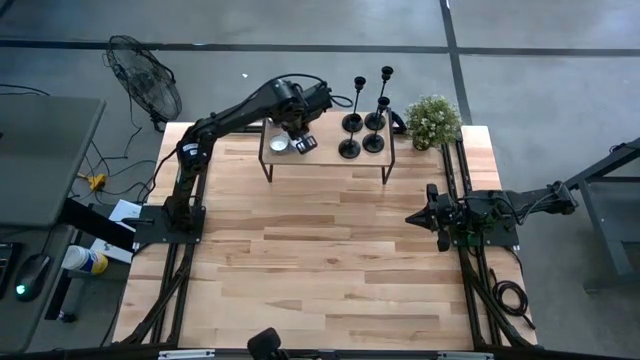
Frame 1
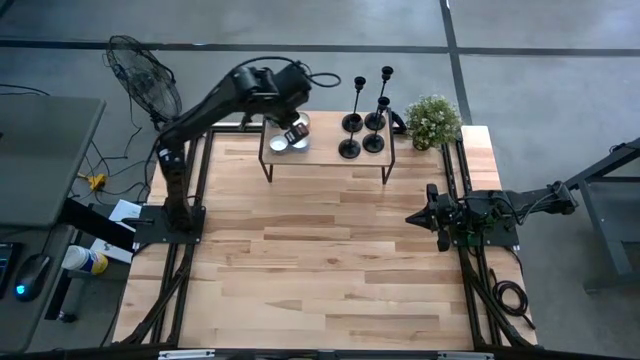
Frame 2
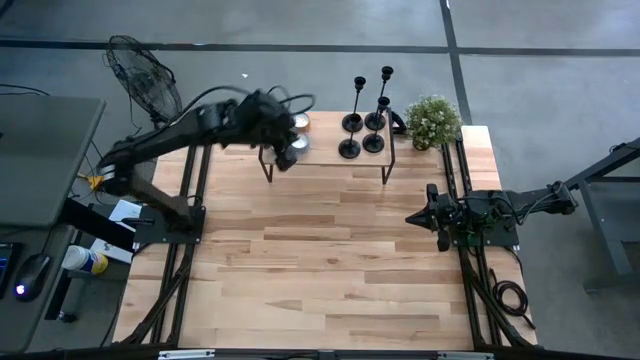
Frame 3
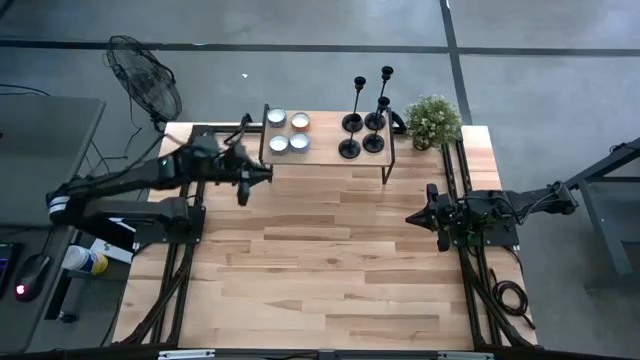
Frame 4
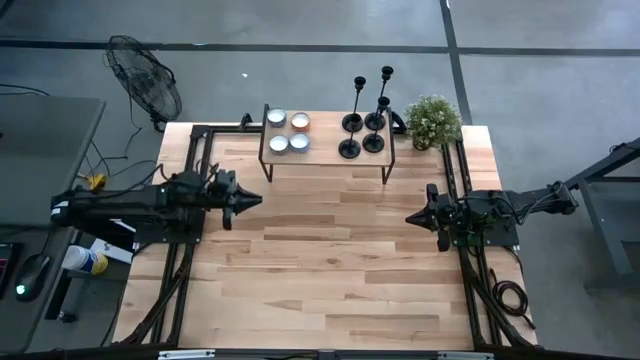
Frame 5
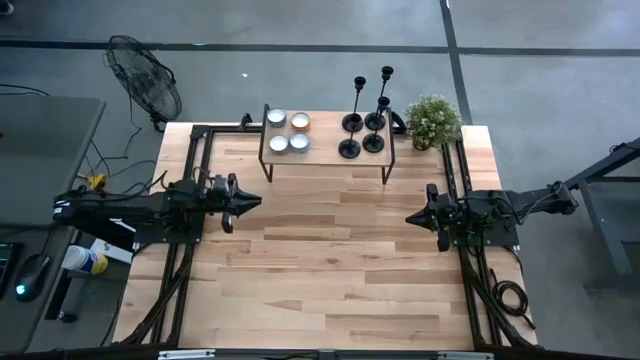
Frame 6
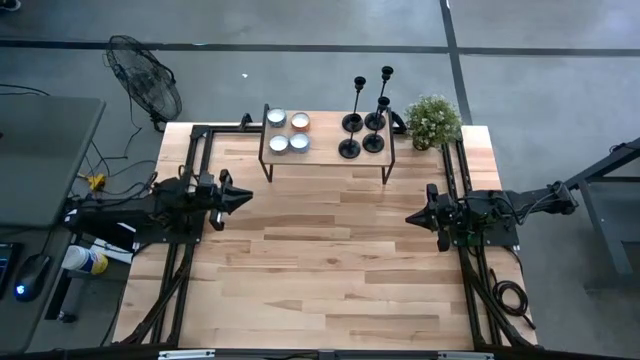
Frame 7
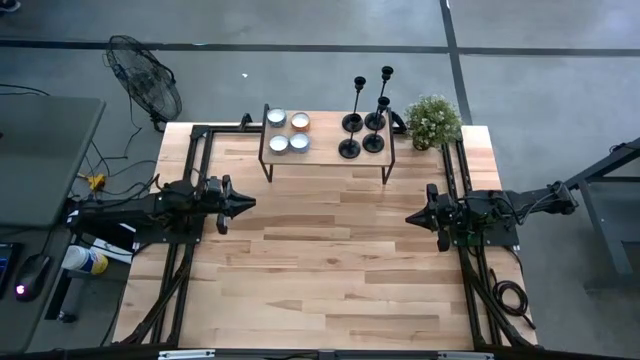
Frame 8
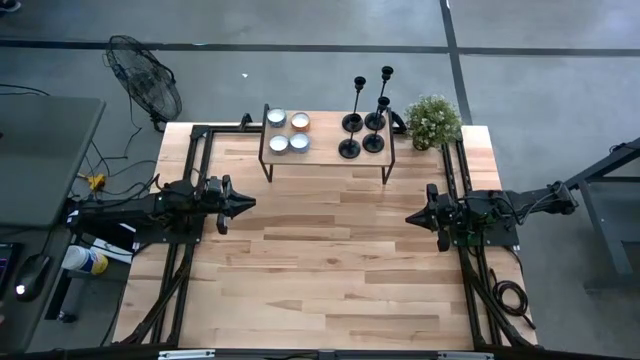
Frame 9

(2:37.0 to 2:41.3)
Task: Pick & Place candle stick holders
Return to Home Position

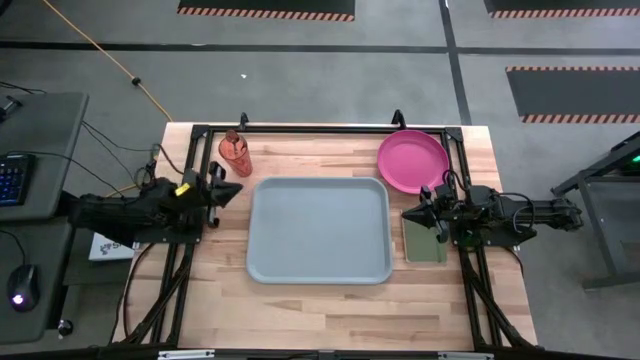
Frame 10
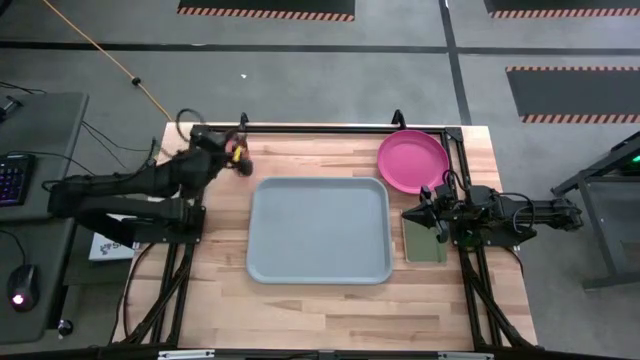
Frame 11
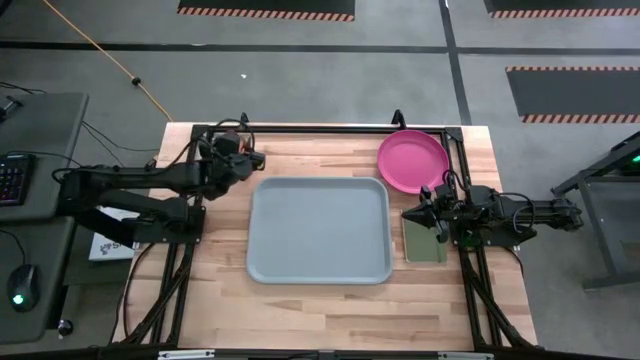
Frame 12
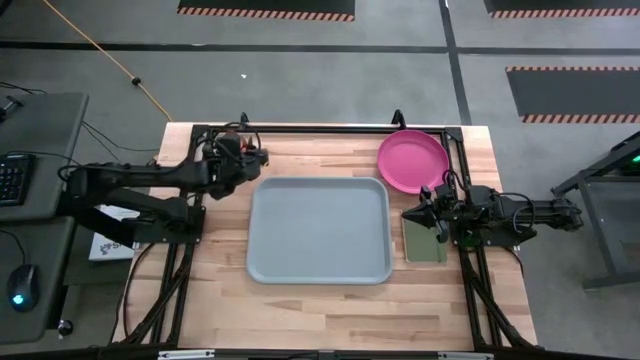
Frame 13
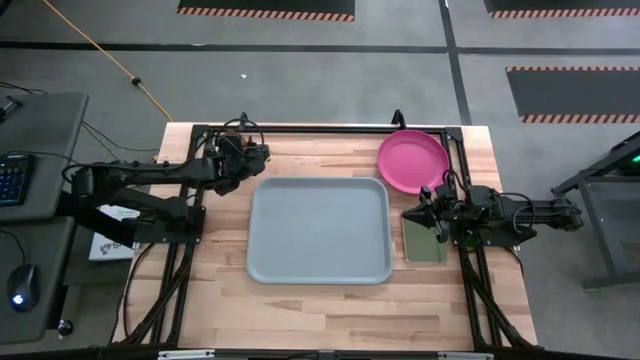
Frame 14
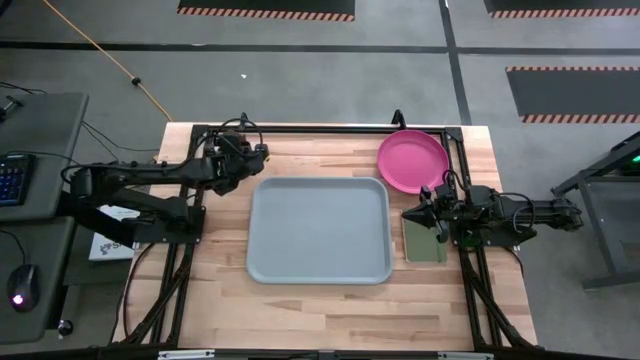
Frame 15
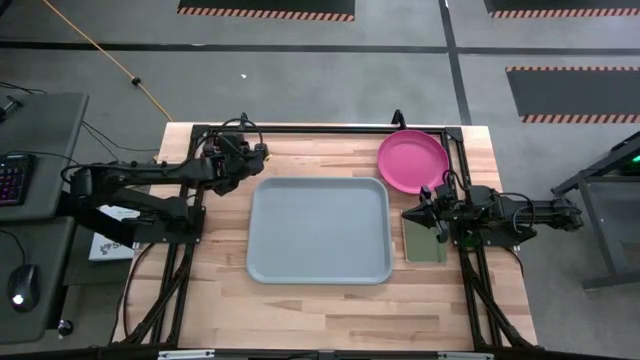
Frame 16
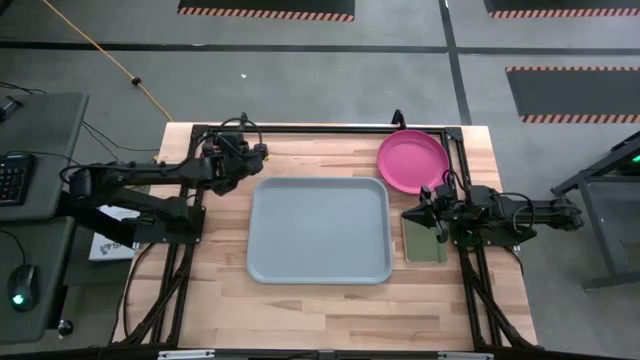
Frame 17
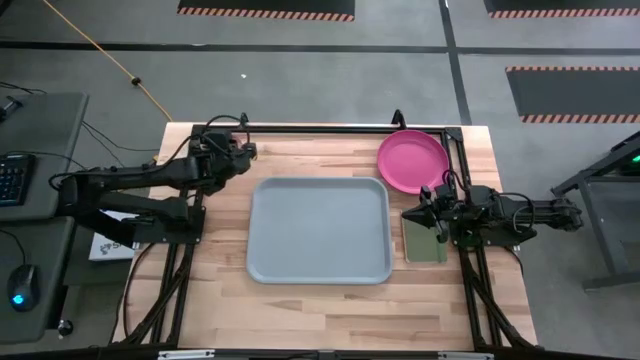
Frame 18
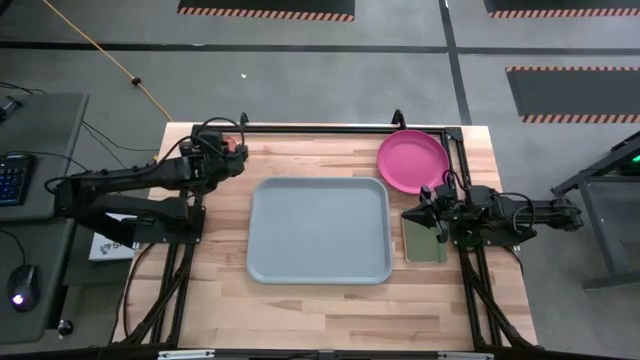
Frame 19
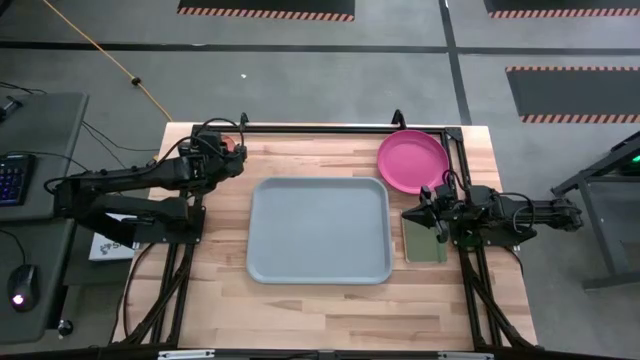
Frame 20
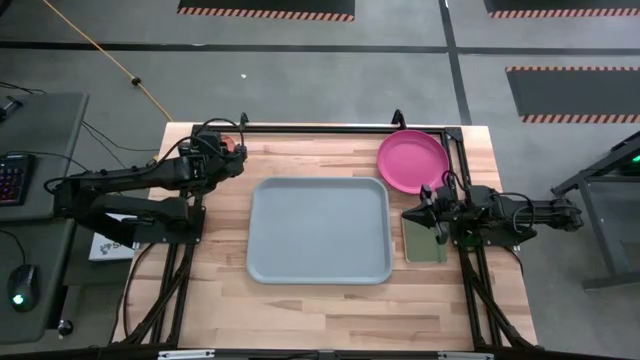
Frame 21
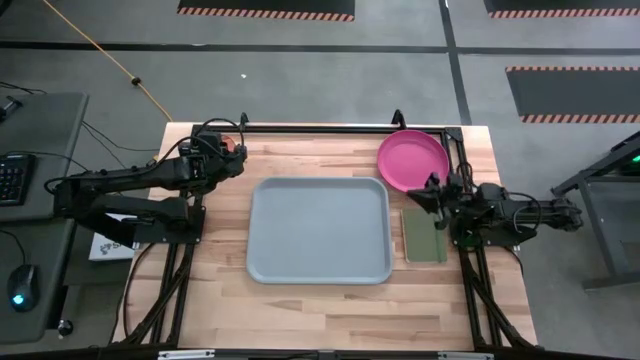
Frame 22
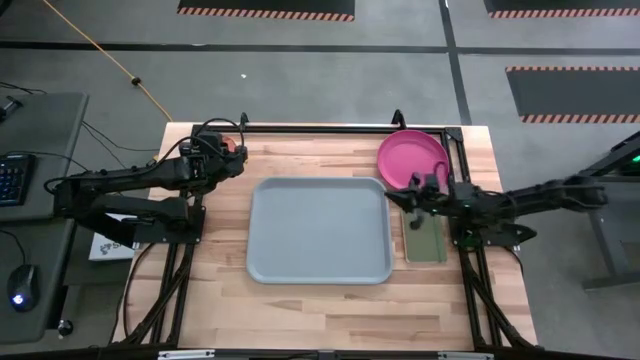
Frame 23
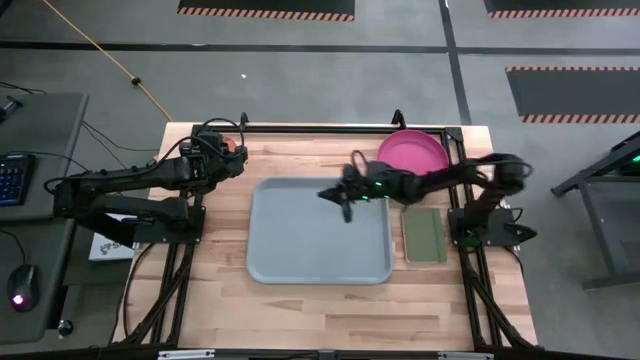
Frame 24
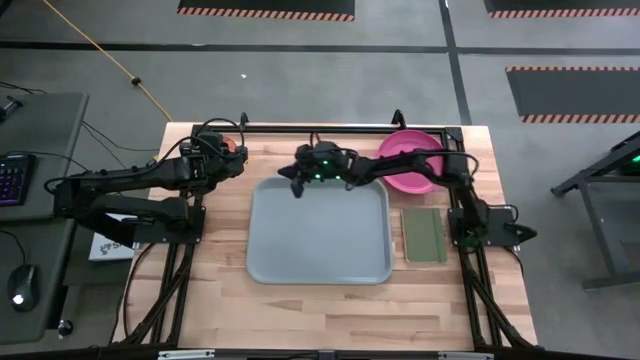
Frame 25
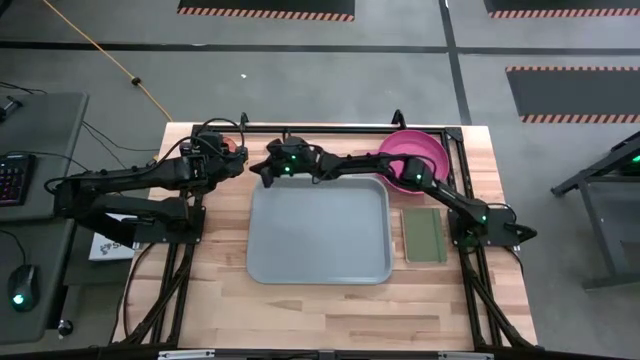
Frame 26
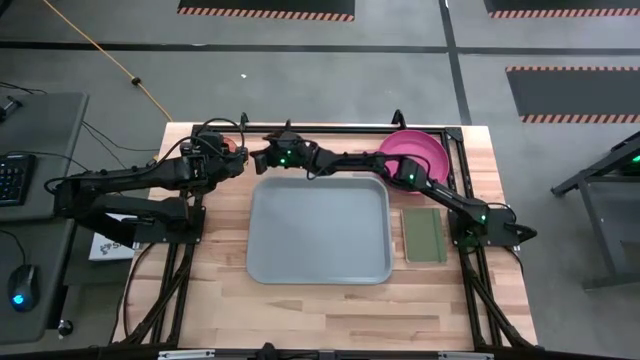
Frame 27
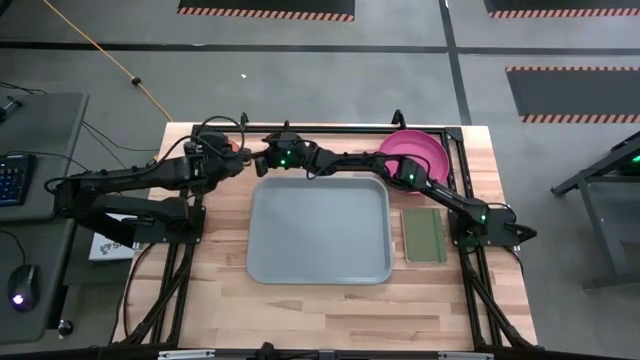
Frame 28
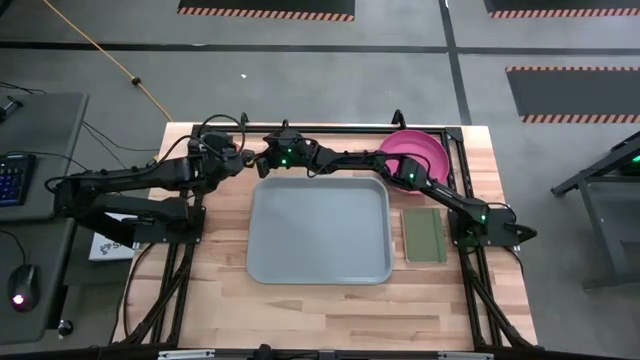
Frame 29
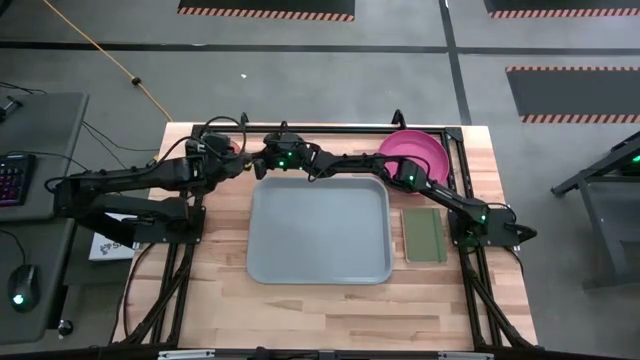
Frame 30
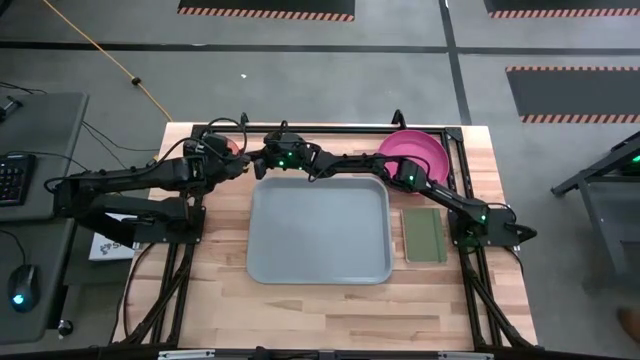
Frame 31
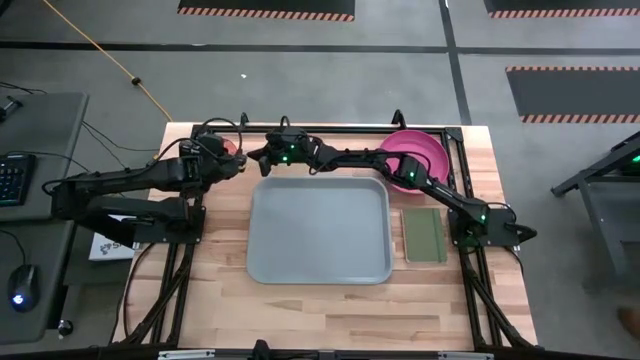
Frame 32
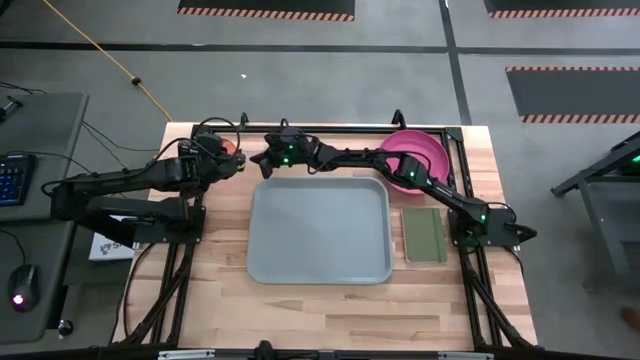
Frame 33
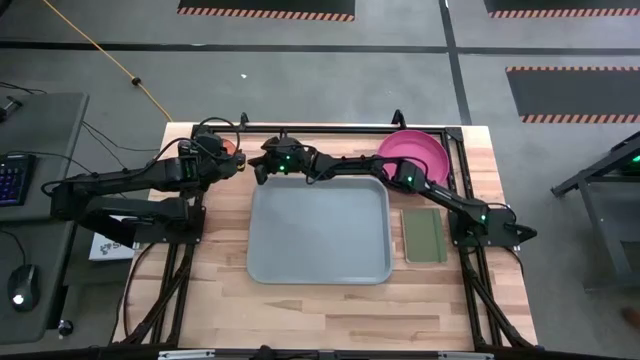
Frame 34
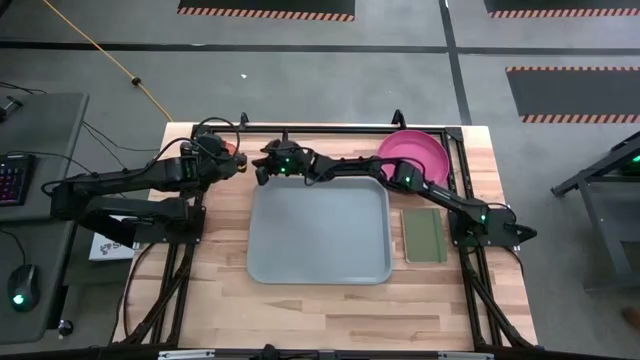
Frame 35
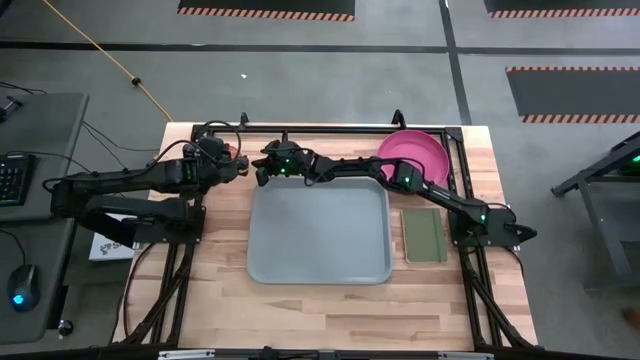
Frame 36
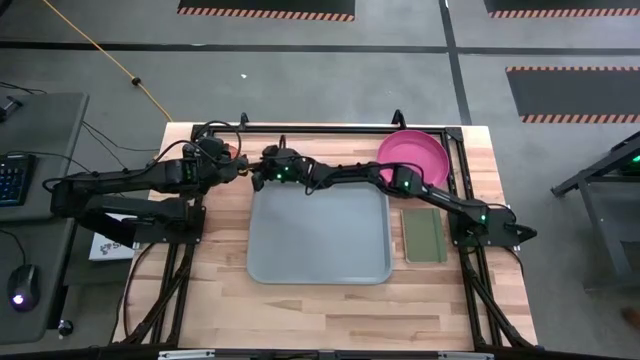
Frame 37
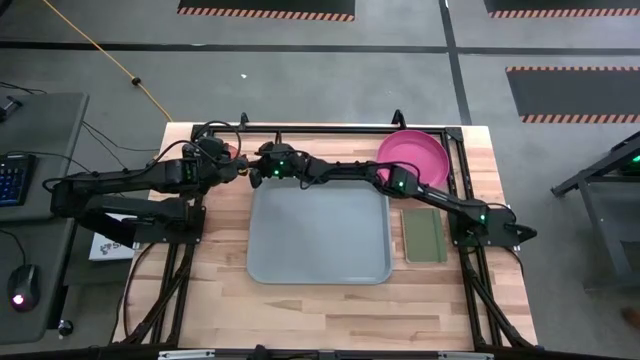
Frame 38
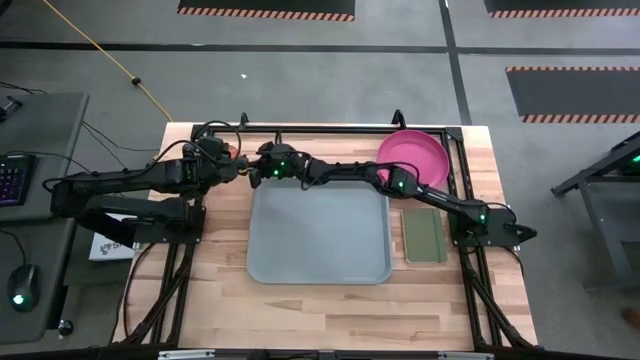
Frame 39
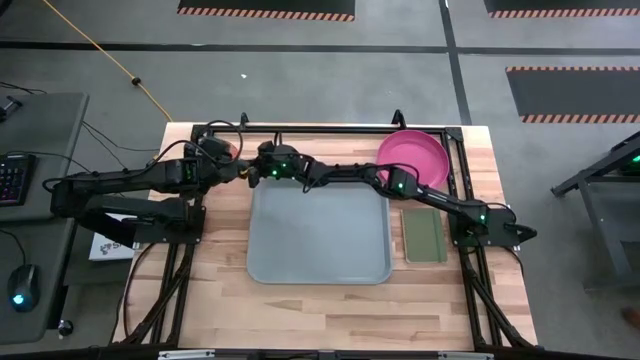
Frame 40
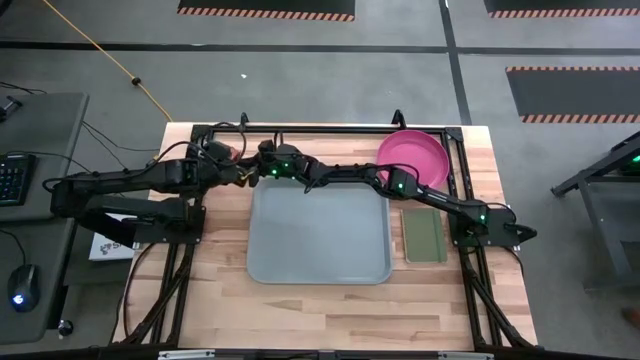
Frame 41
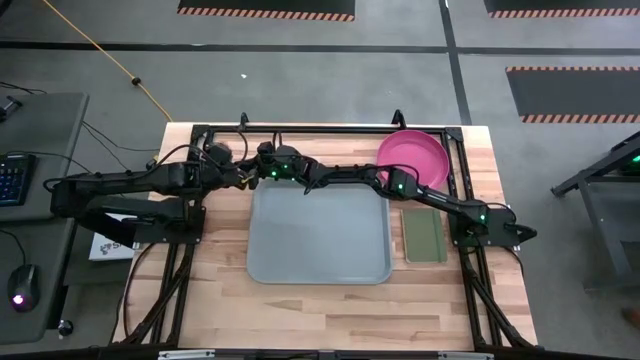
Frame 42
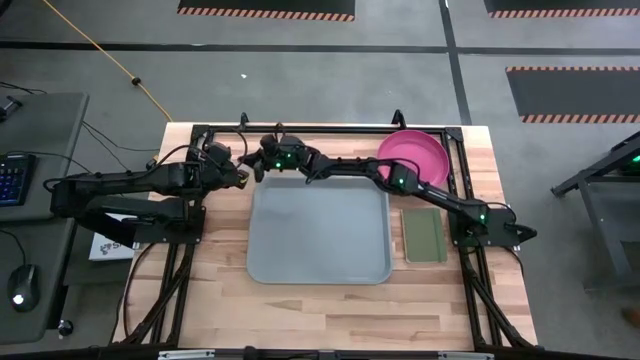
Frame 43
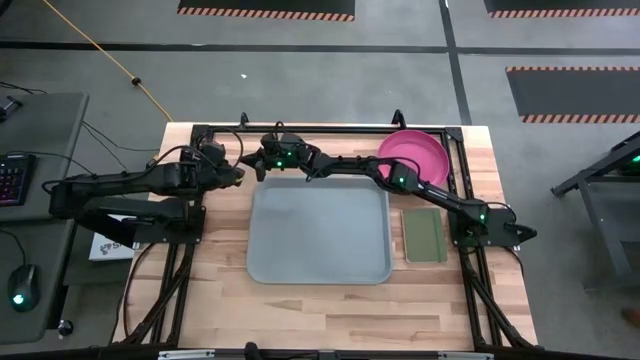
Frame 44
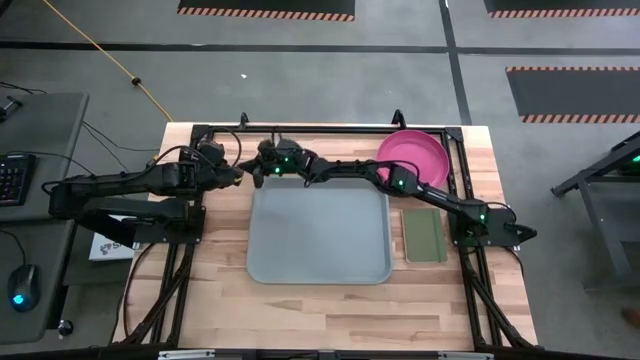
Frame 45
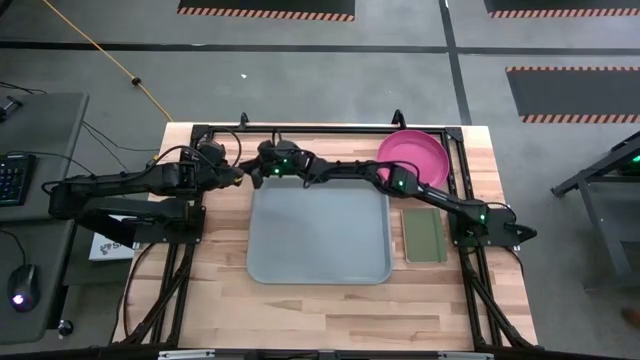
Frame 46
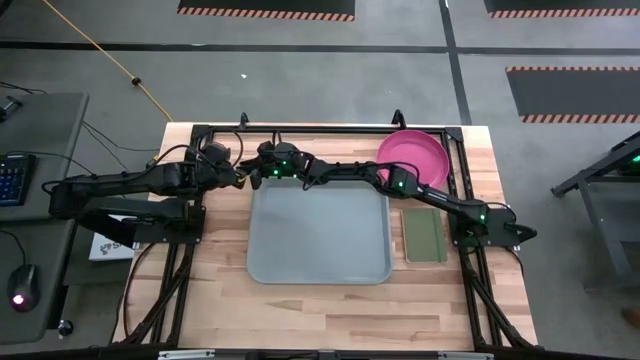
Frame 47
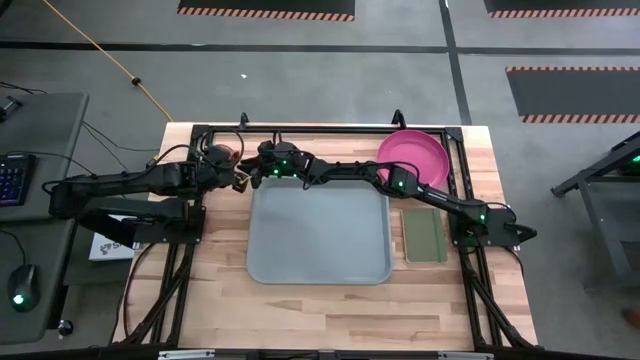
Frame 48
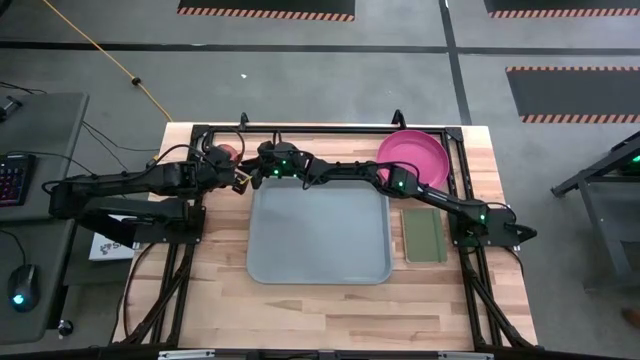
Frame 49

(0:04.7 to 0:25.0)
Task: Pick and place plate/cup/fork/spoon on tray
Put the orange fork on the gray serving tray
